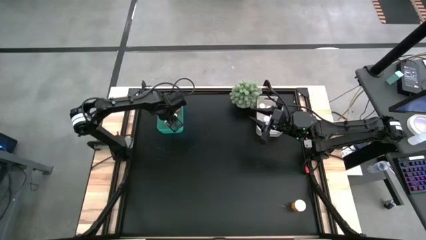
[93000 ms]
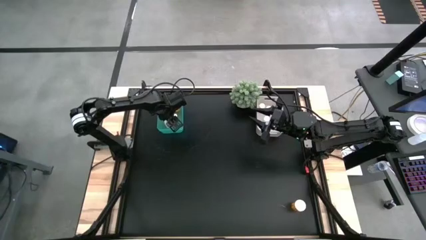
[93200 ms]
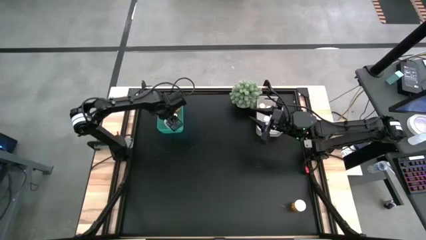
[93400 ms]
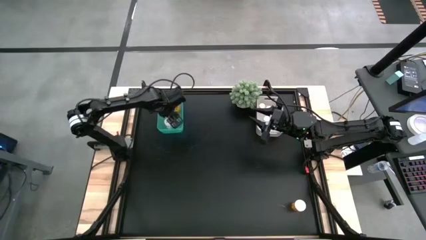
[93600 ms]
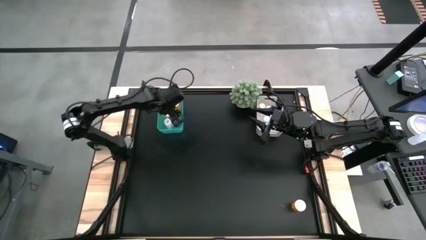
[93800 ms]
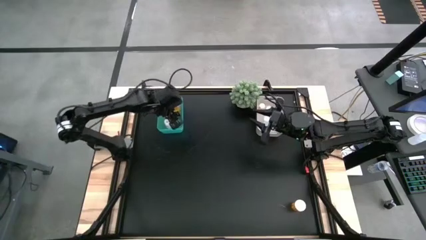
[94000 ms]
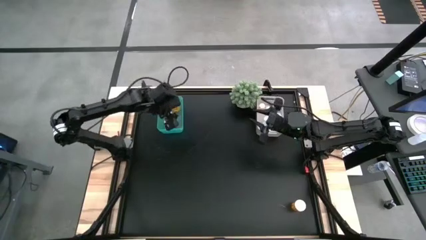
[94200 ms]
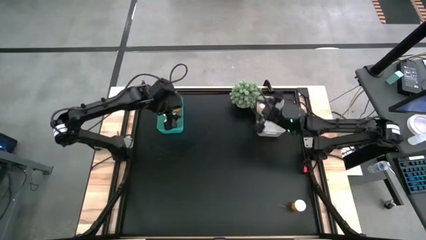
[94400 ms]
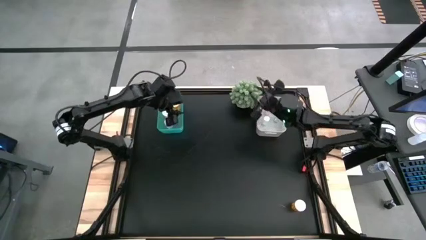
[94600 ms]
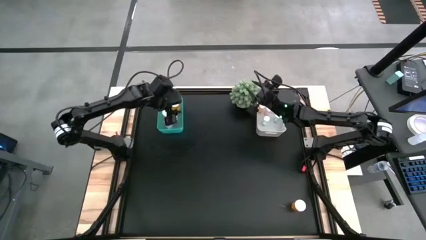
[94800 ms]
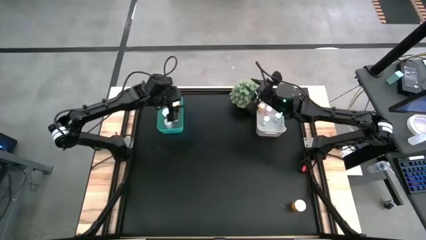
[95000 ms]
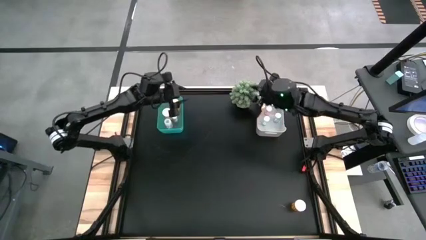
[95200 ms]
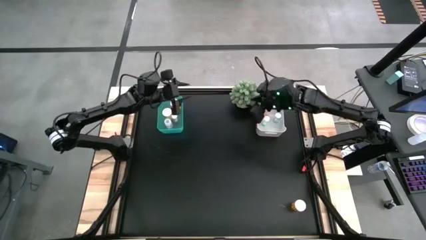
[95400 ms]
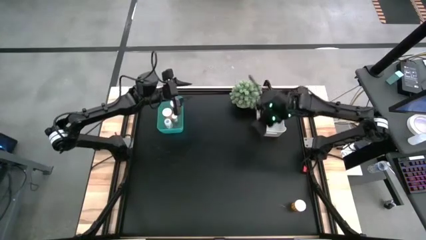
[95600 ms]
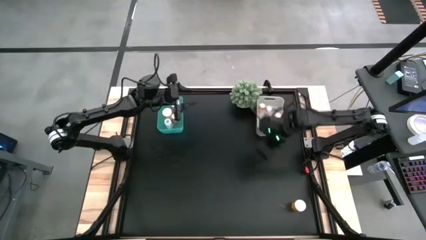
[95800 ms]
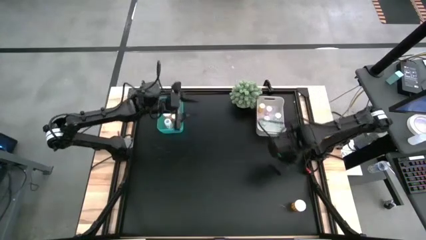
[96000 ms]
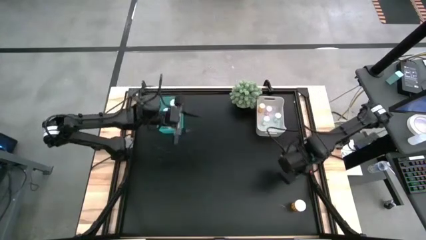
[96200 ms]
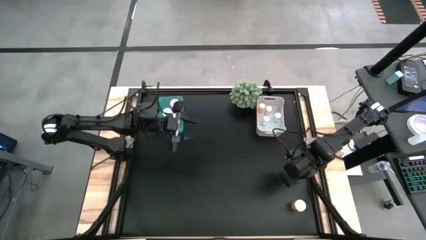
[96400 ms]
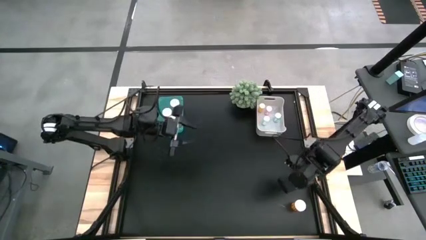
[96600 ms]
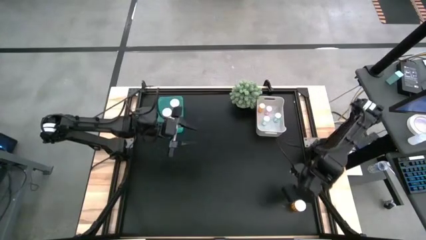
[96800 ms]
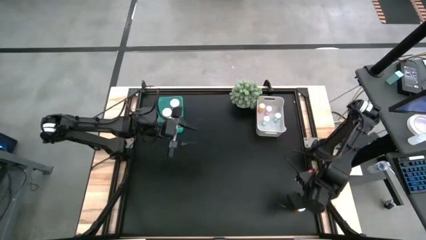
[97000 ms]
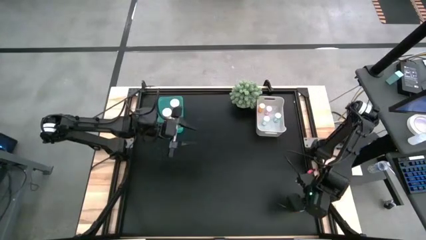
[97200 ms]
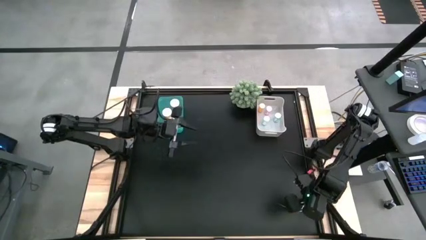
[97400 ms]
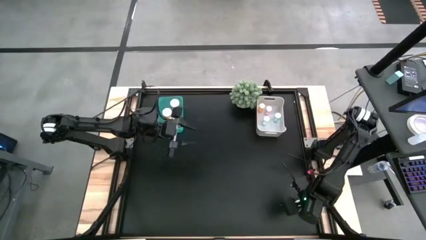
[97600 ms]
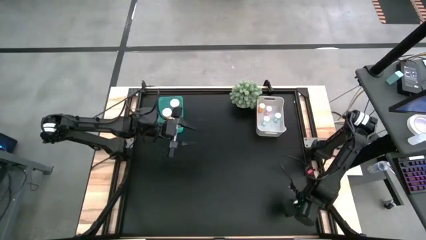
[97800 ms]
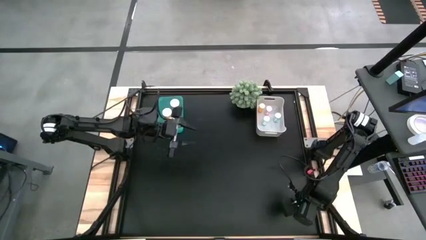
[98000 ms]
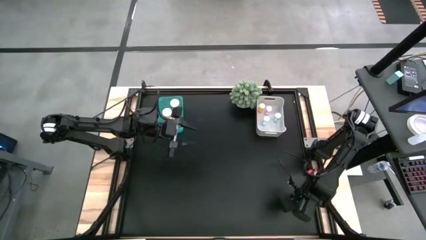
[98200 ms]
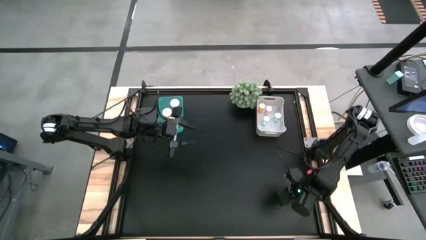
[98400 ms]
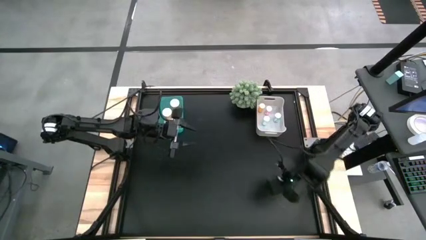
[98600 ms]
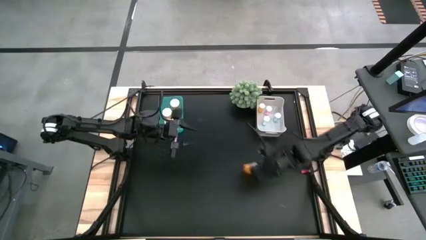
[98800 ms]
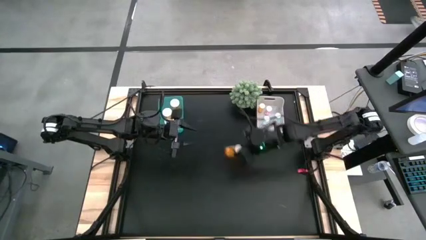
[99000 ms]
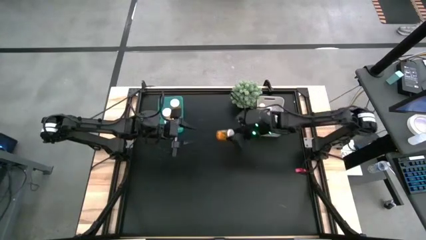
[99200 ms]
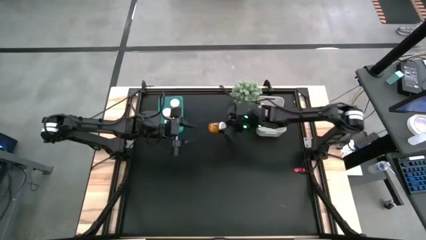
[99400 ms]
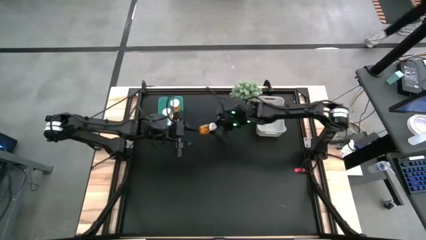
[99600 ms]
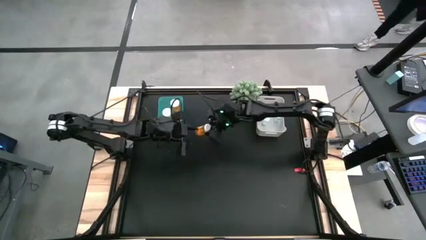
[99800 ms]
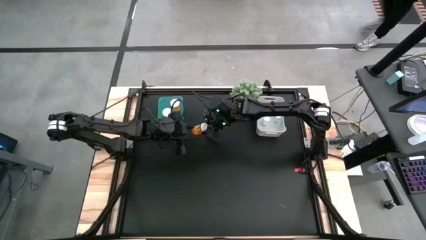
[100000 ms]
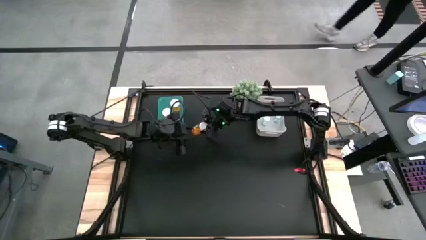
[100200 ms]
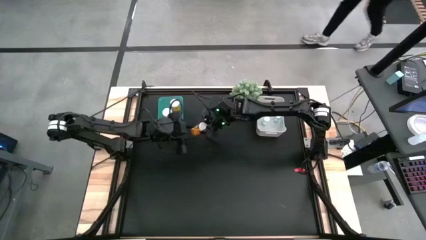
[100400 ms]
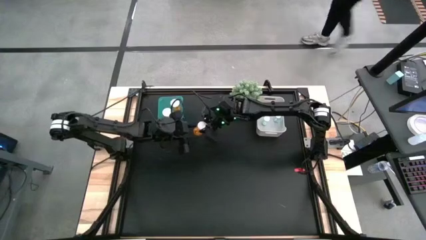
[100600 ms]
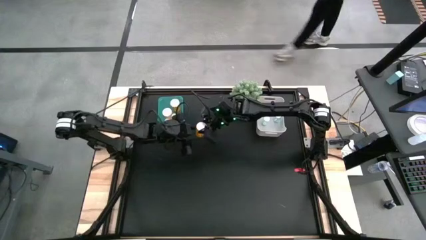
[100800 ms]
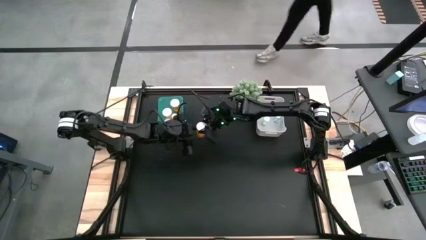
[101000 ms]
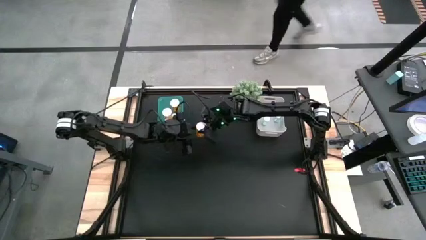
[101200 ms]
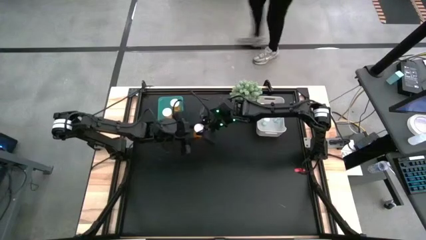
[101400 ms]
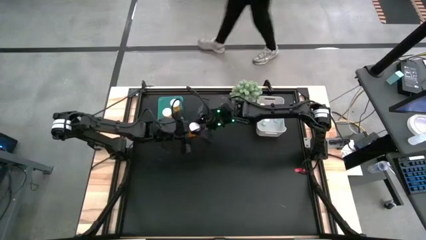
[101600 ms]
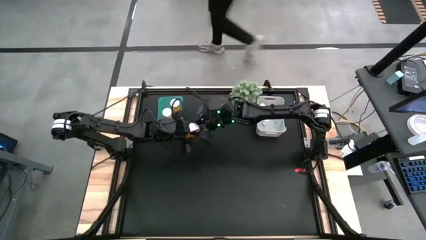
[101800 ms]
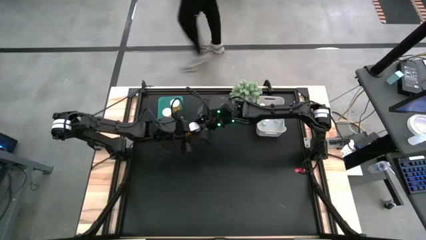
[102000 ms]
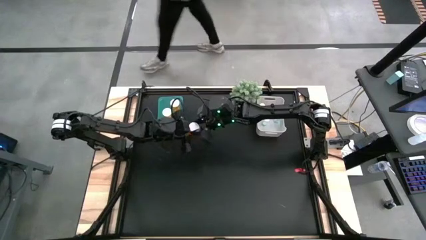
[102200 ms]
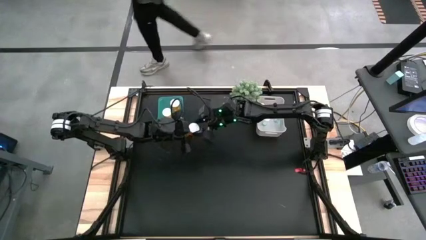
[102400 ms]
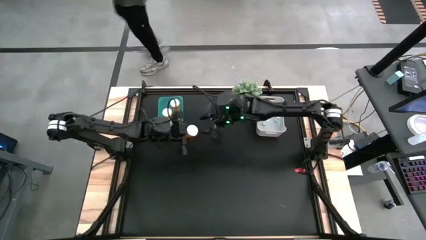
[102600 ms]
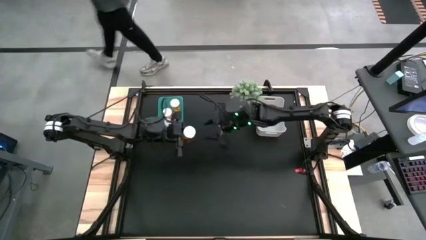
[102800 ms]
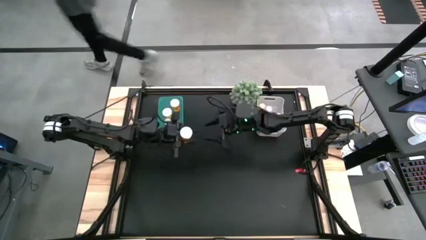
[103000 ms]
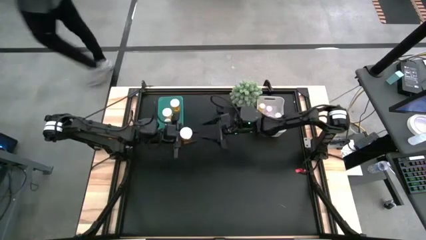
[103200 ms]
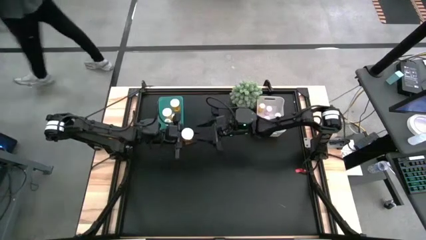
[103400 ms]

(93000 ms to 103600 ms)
Task: Pick and place medicine bottles into bin by pill shape (circle, oval)
Put the orange capsule bottle into the green bin

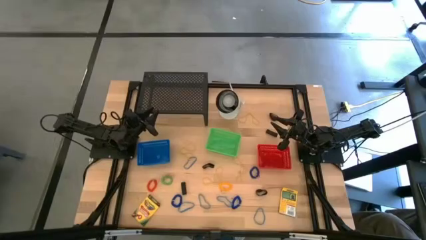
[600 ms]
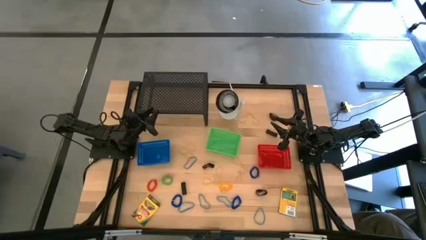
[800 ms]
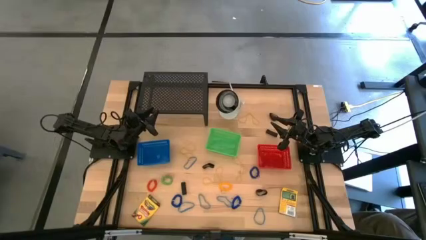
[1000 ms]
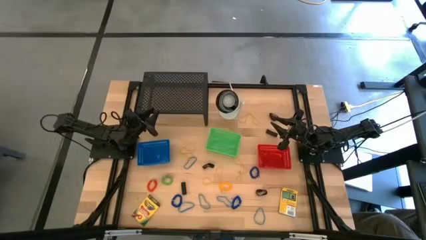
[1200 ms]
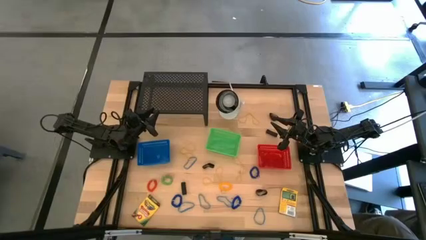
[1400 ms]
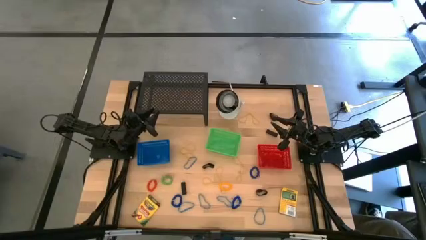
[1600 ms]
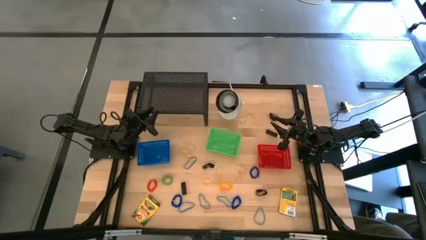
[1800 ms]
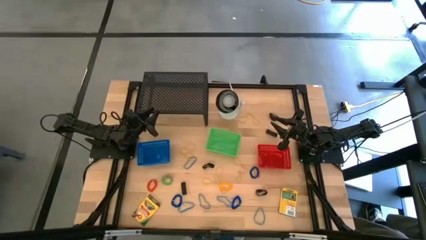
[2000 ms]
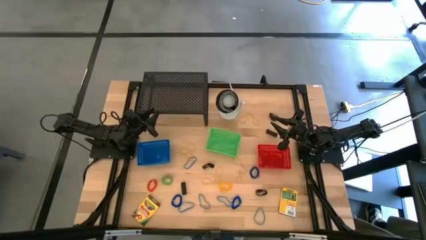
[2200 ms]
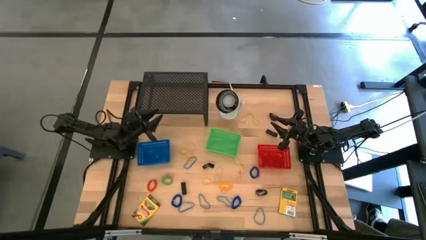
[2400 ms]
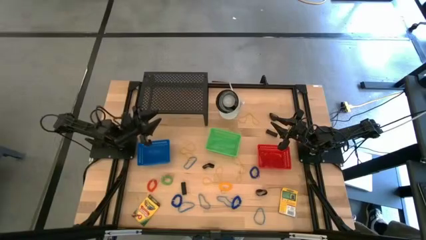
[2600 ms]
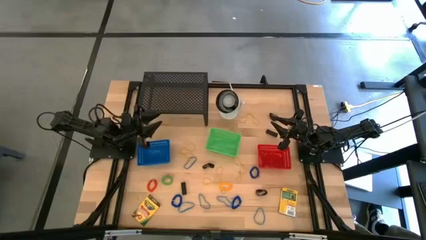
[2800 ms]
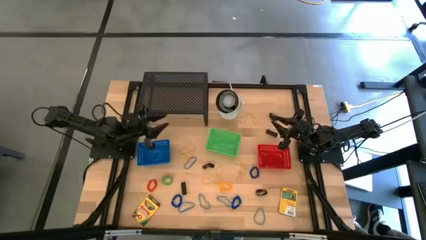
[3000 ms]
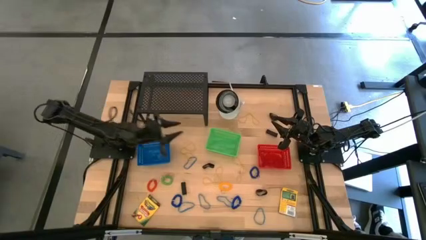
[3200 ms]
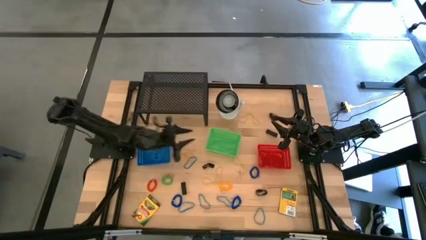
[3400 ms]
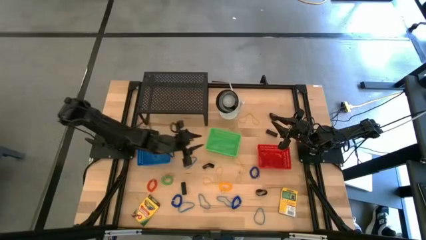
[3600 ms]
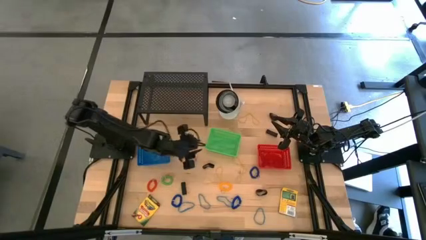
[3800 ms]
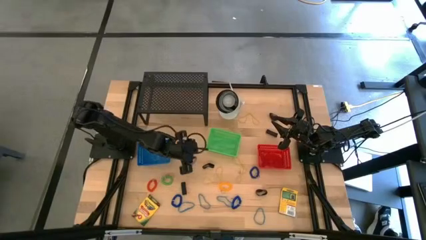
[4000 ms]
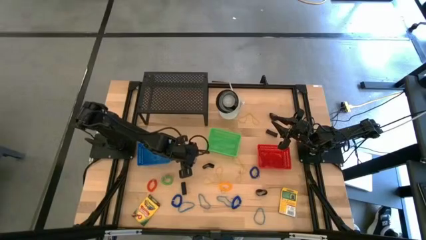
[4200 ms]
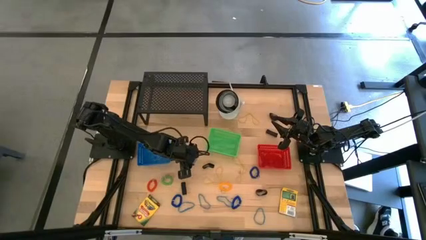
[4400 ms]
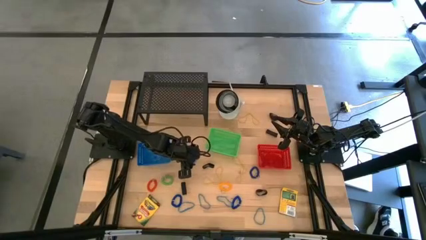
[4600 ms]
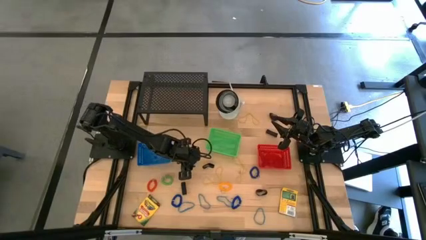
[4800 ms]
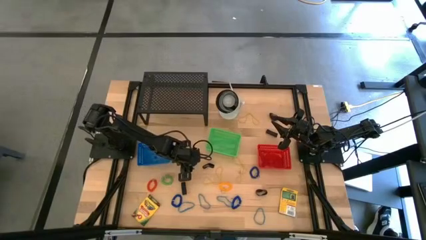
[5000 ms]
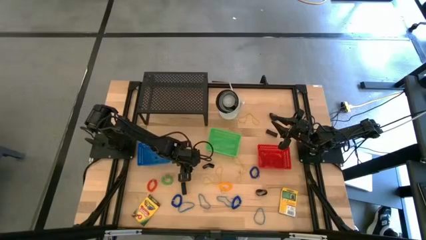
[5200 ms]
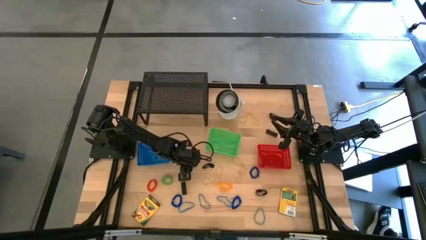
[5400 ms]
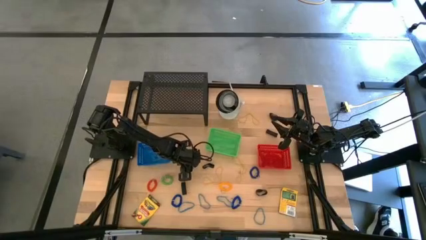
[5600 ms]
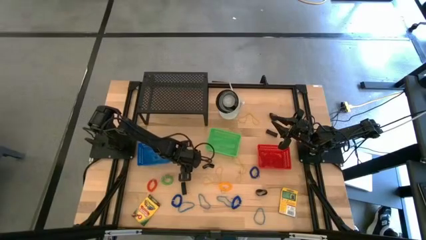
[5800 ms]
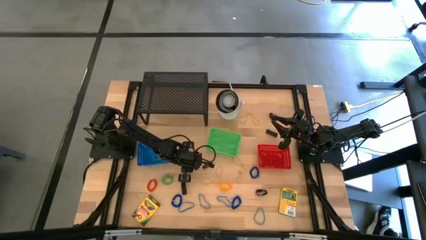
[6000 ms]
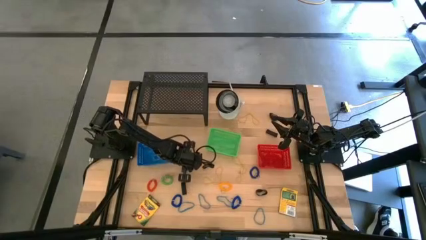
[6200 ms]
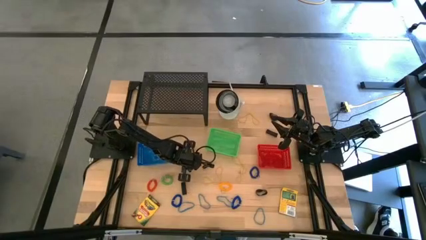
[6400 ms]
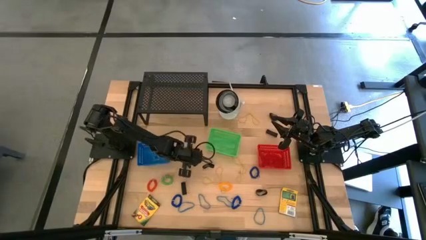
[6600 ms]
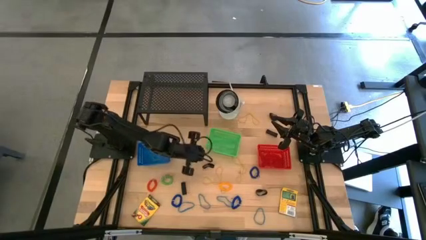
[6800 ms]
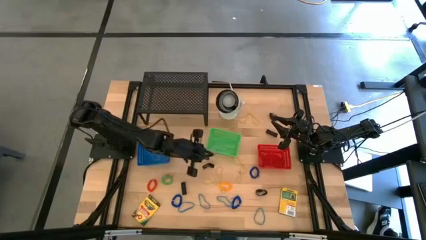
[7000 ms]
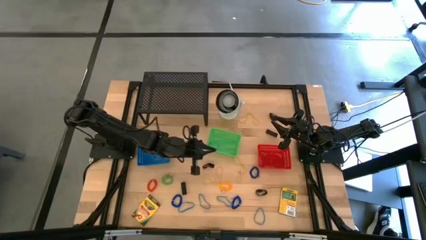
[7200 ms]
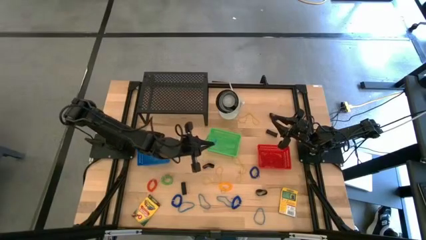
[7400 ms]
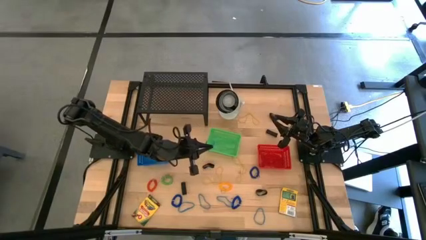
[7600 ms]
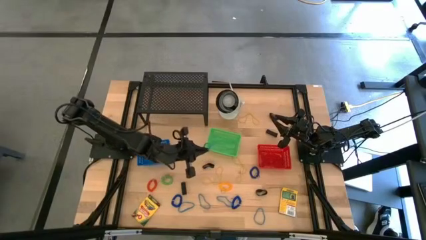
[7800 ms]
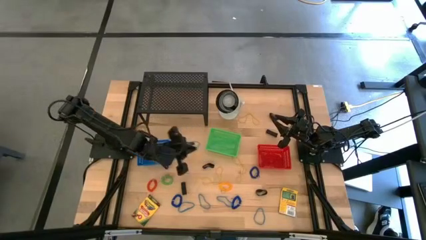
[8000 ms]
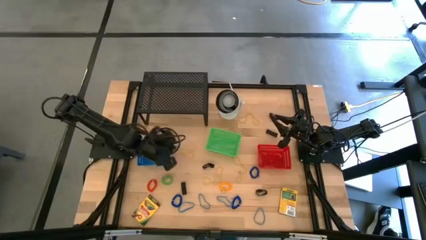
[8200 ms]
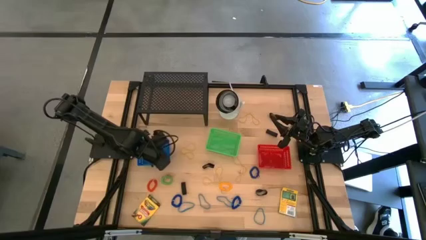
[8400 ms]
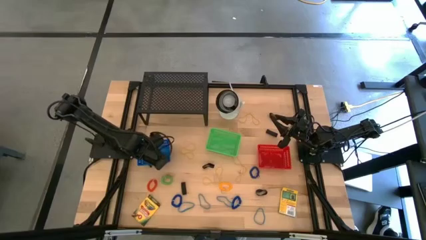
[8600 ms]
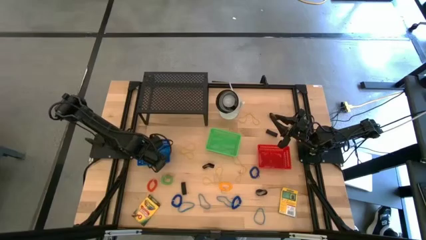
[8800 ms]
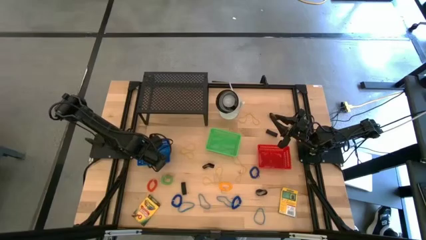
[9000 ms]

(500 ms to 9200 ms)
Task: Pick & Place Office Desk Supplies
Put the blue rubber band into the blue bin
